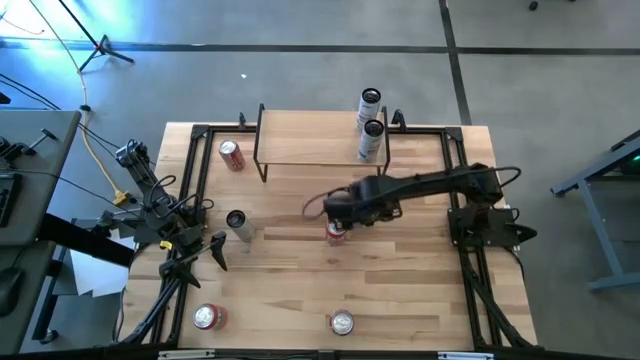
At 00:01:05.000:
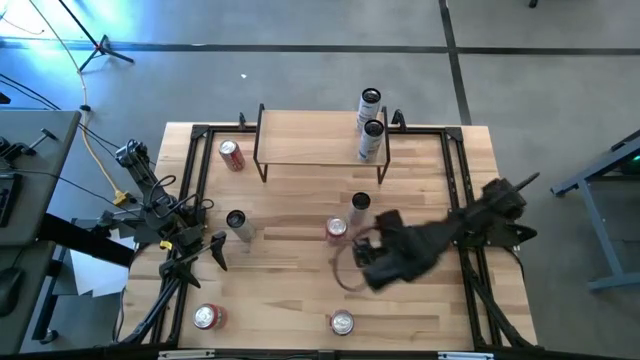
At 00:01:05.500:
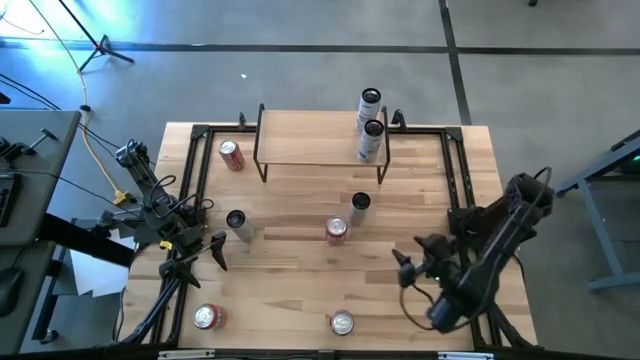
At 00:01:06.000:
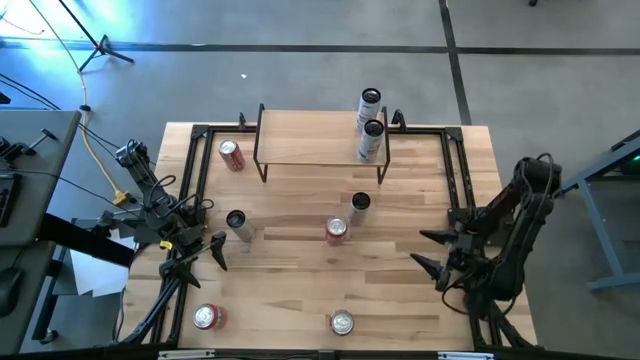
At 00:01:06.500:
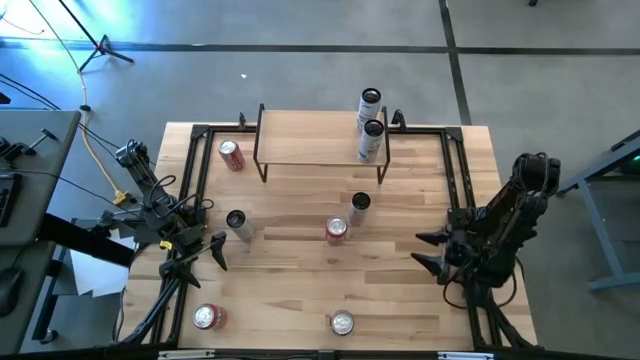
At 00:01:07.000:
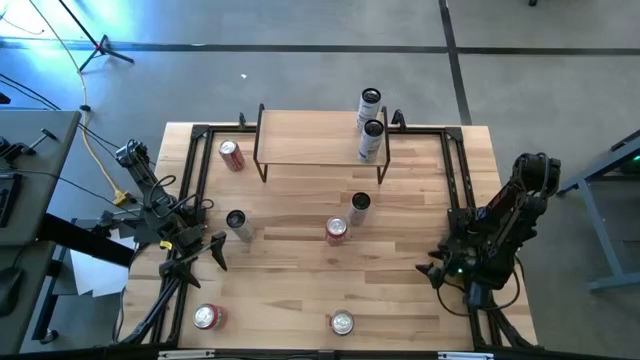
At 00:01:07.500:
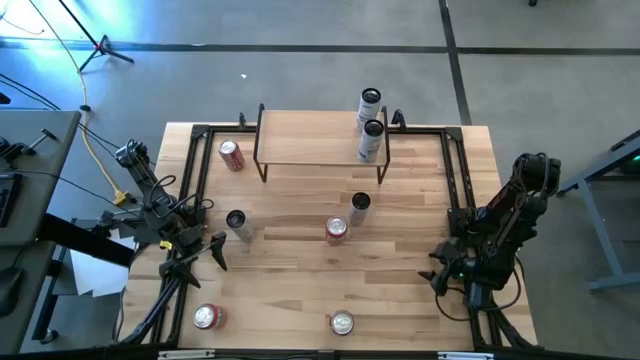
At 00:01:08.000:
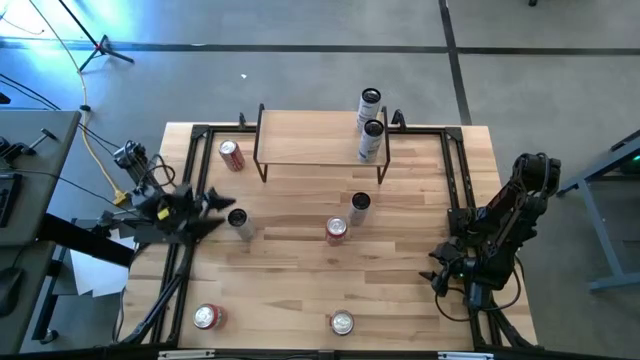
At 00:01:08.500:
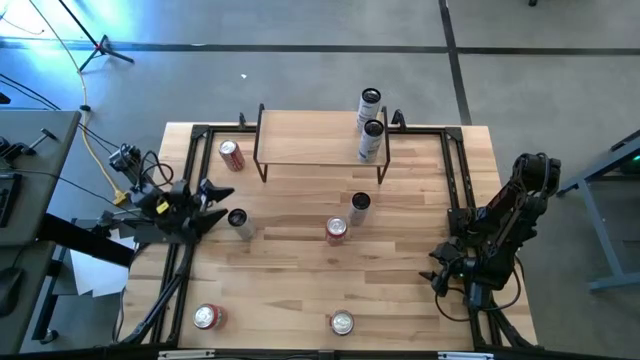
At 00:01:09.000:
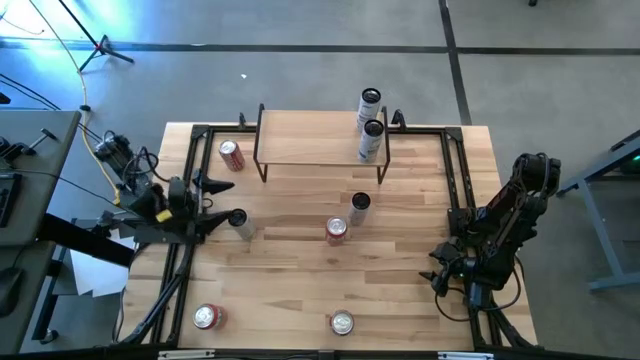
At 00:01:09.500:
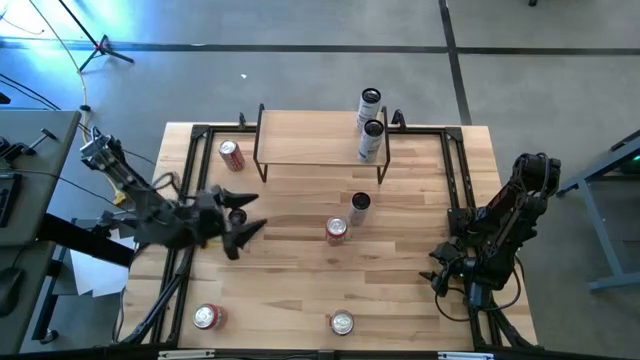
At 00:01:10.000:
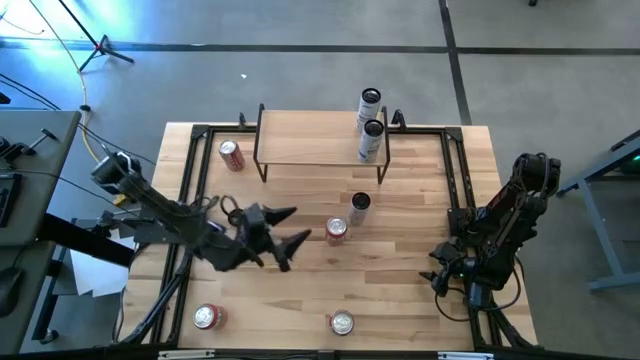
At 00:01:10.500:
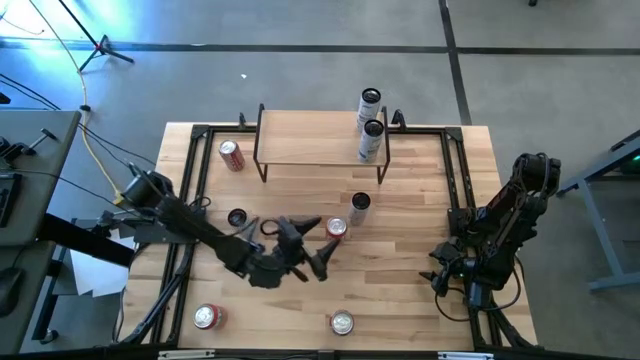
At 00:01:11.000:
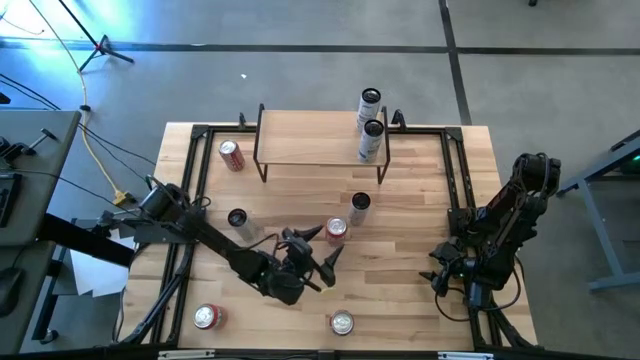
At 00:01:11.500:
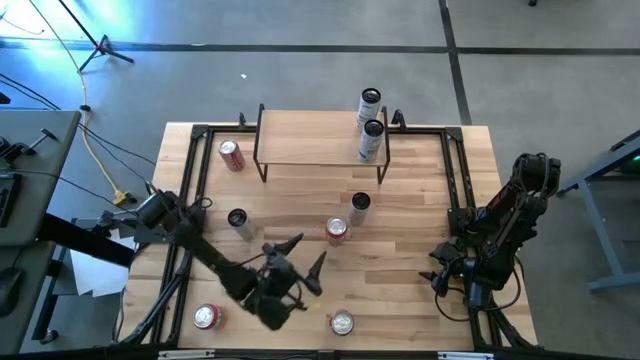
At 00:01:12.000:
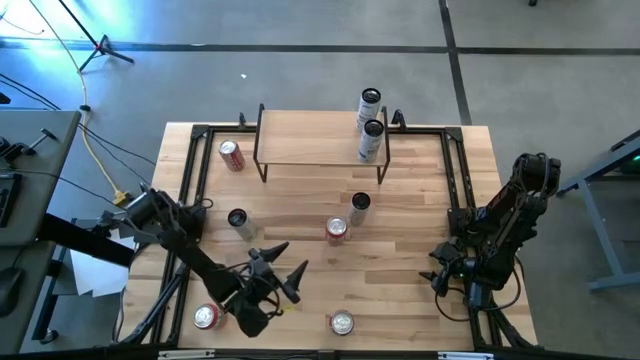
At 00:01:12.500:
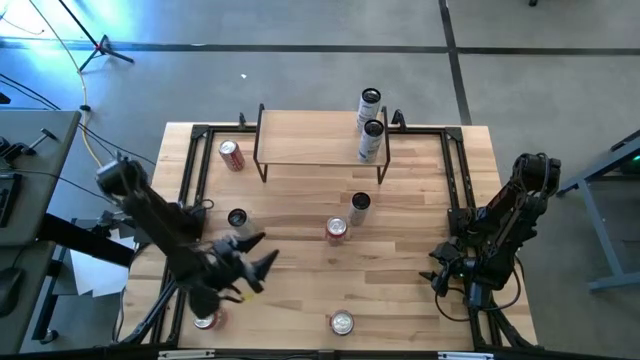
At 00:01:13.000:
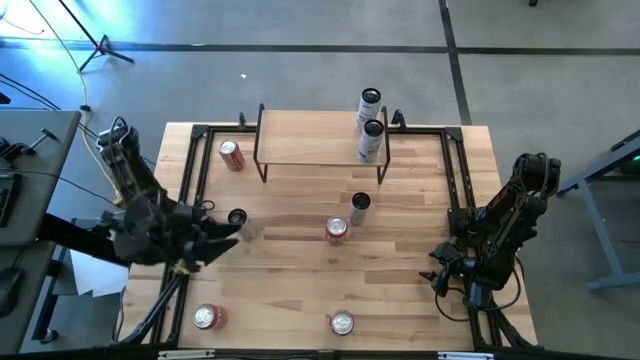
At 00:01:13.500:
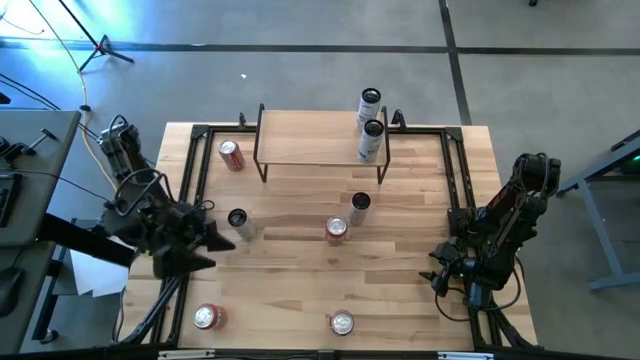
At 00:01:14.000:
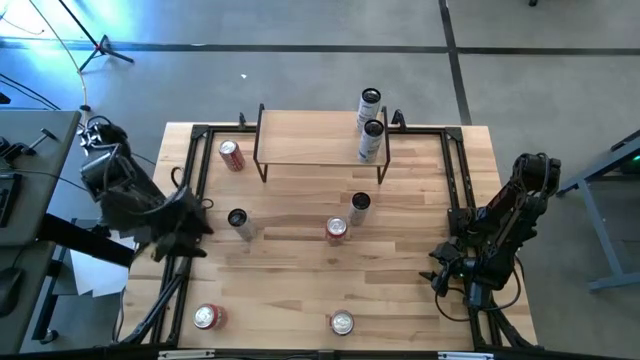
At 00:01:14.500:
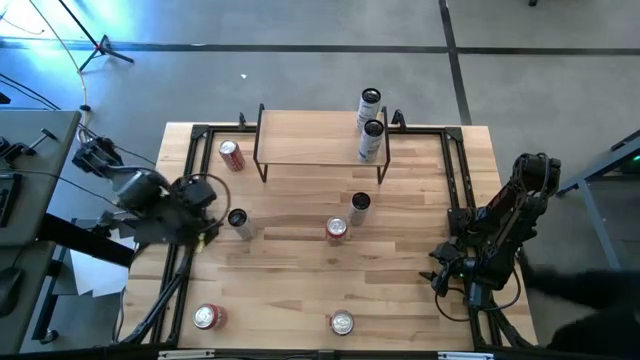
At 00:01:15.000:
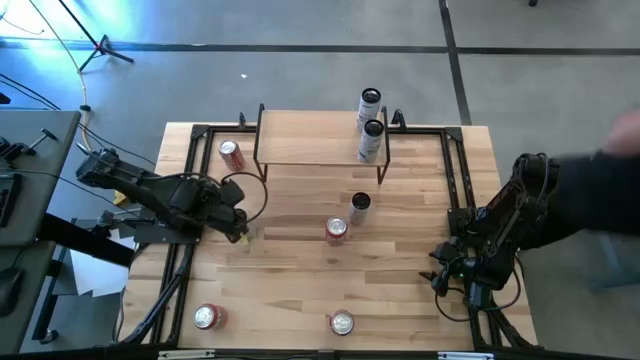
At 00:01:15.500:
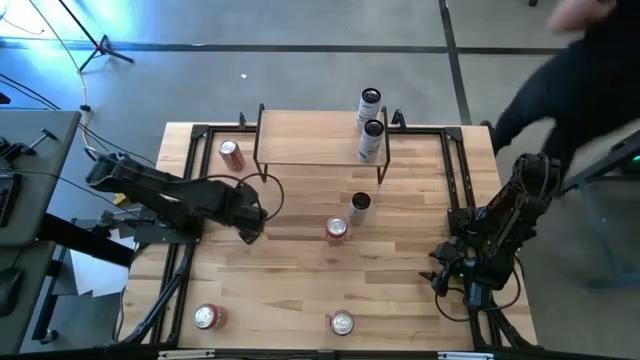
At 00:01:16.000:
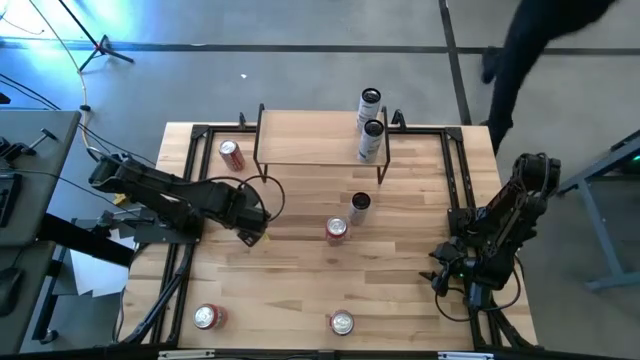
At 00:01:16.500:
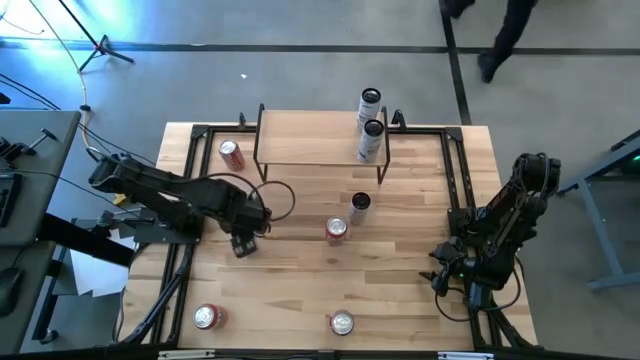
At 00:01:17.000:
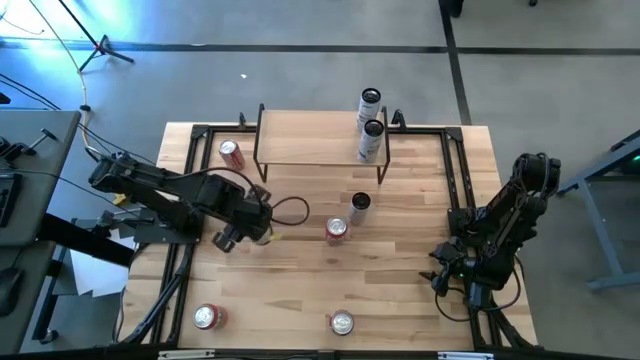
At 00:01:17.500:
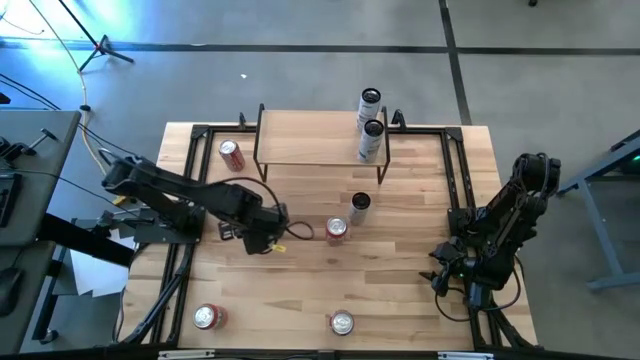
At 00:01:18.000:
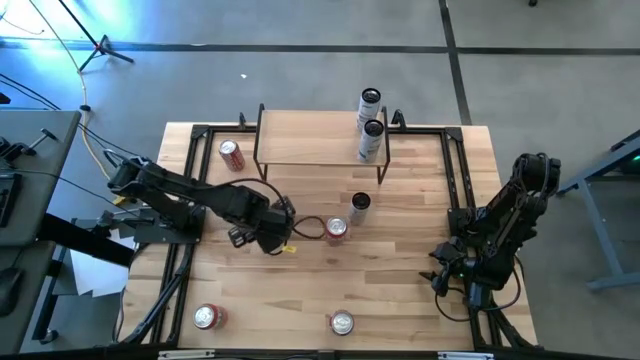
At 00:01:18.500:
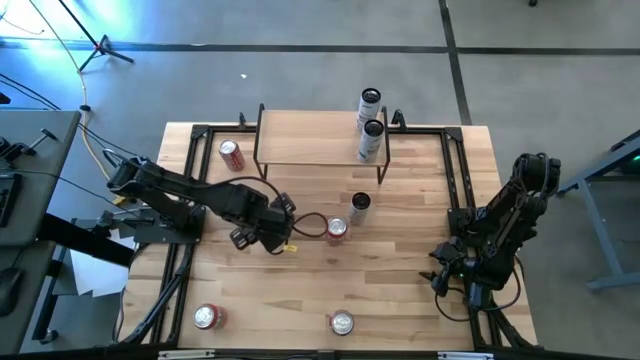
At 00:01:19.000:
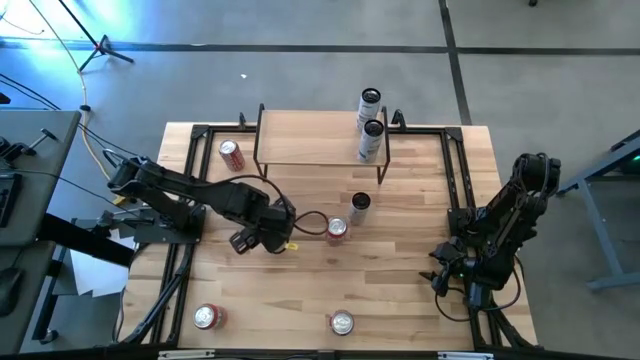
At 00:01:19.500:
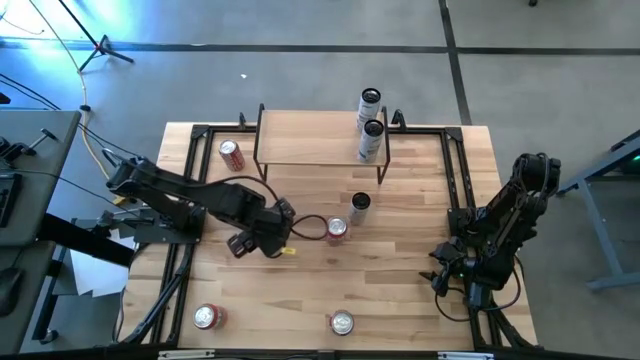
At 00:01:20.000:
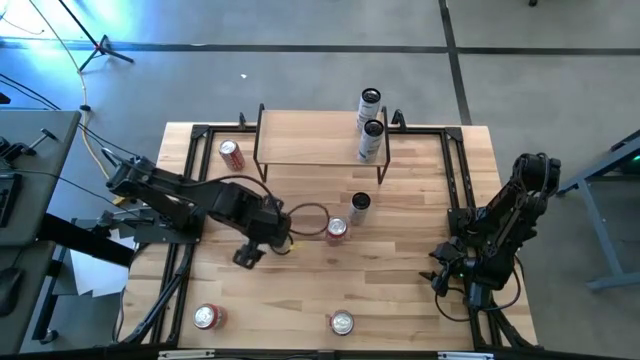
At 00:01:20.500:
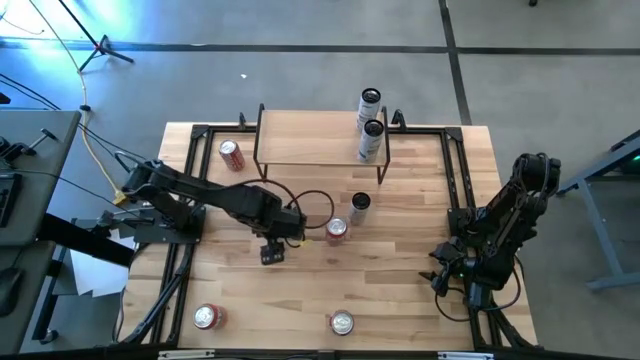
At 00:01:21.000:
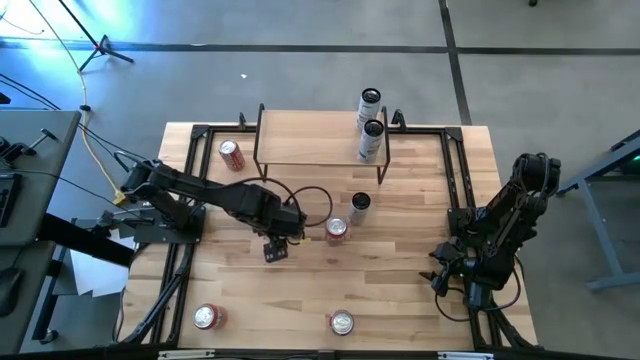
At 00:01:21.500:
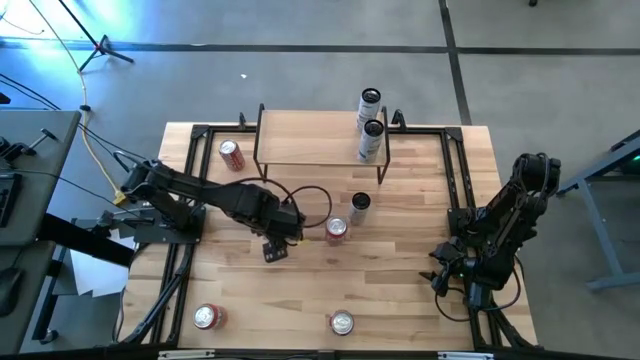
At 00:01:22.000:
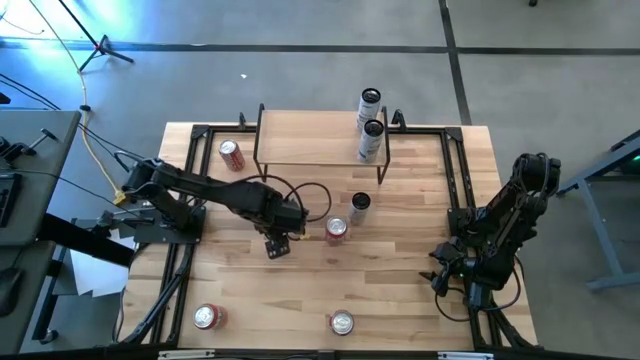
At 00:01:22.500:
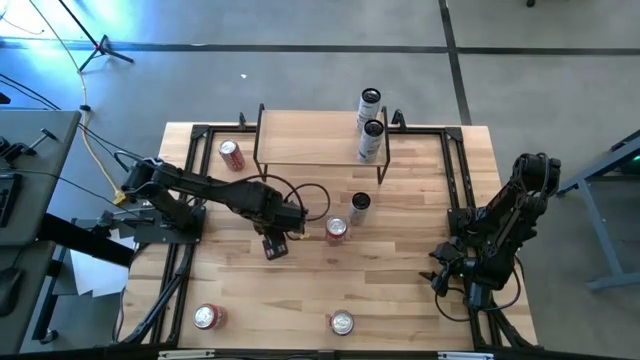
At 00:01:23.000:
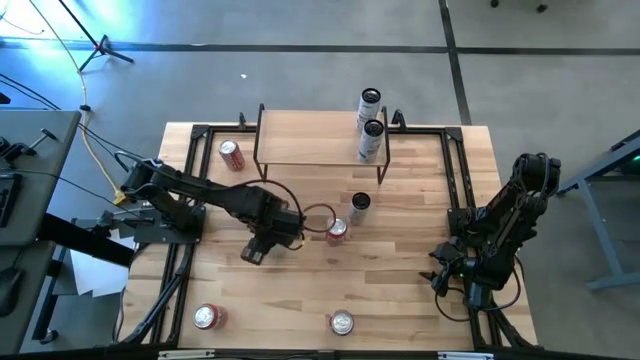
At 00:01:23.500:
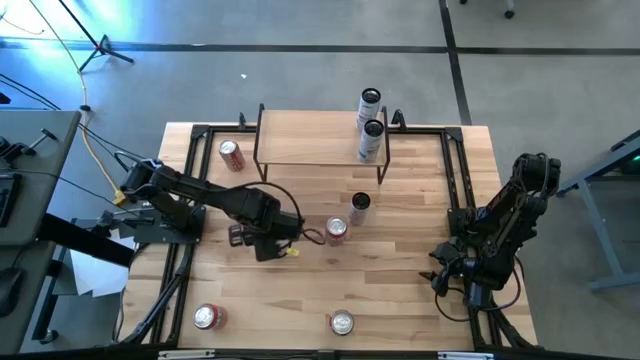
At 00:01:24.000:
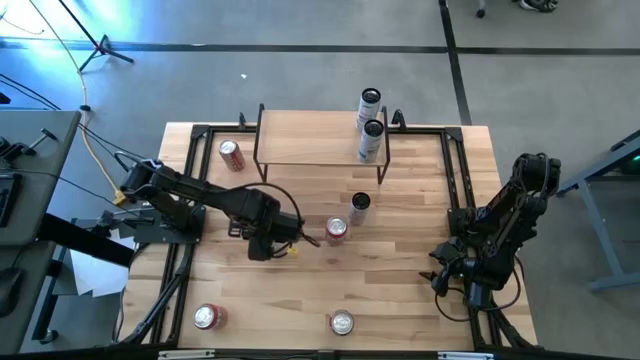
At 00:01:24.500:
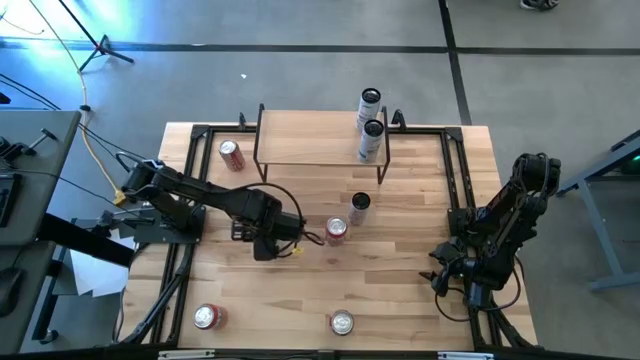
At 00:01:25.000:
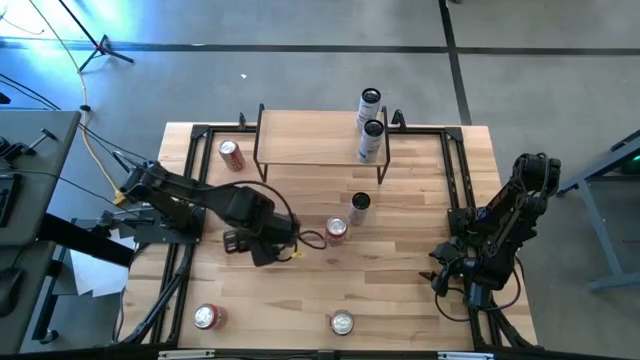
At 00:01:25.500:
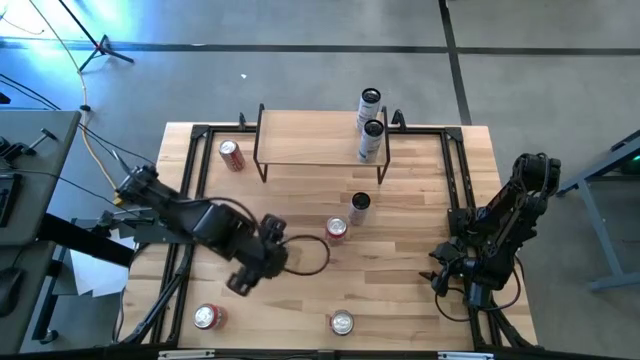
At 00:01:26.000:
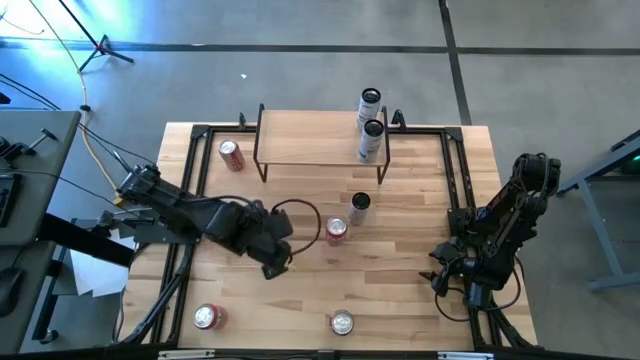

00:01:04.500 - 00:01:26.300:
Task: Place canned beverage on shelf
Put the left white yellow soda can on the shelf
